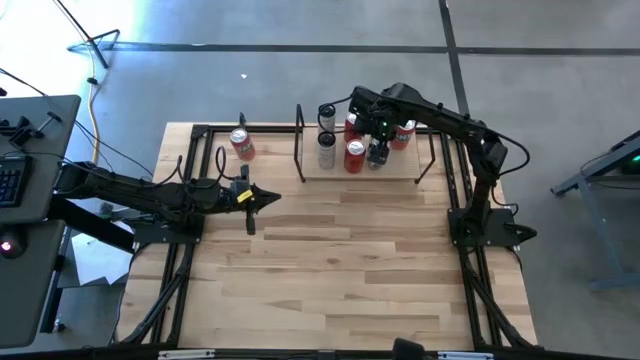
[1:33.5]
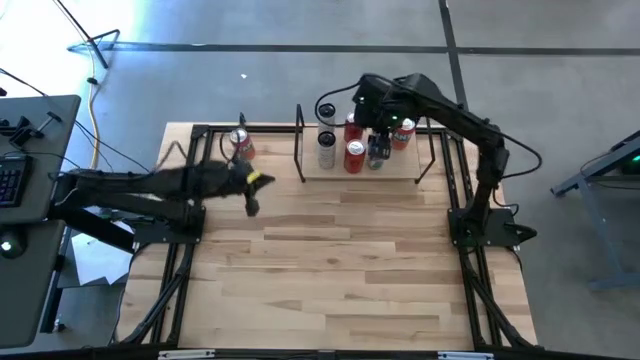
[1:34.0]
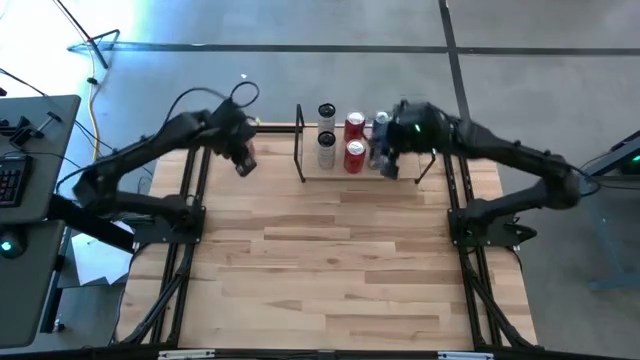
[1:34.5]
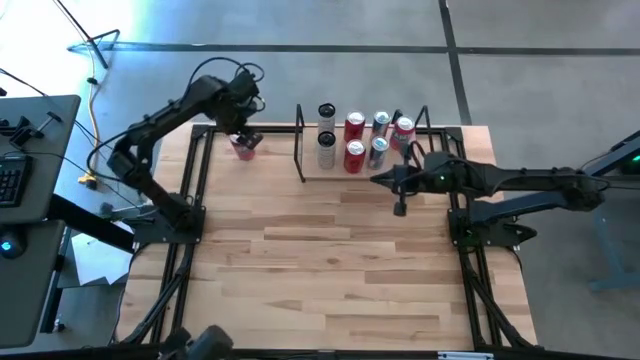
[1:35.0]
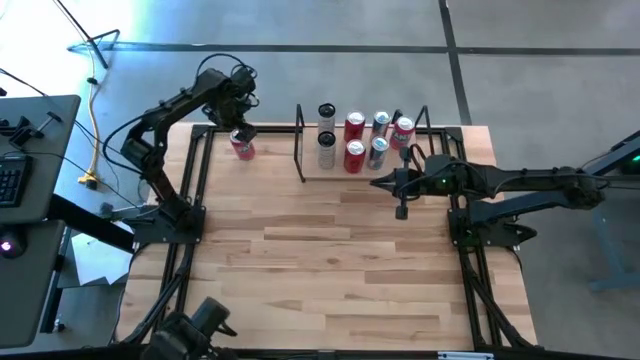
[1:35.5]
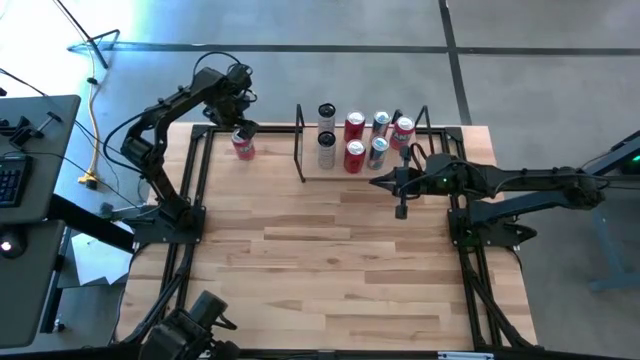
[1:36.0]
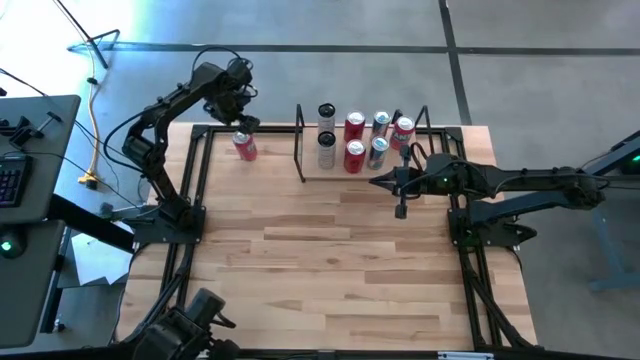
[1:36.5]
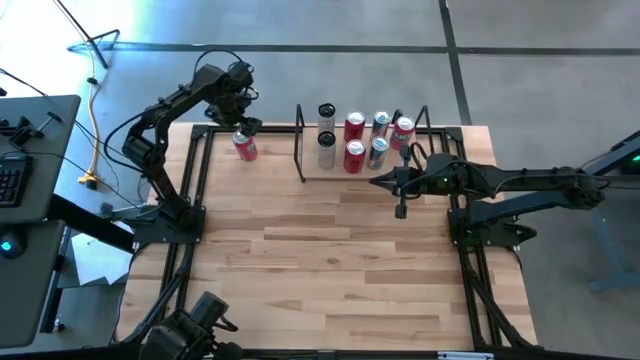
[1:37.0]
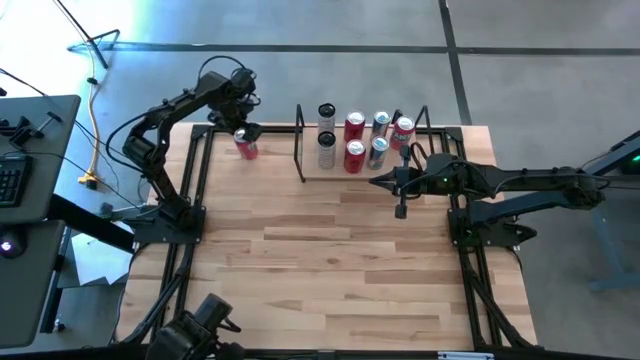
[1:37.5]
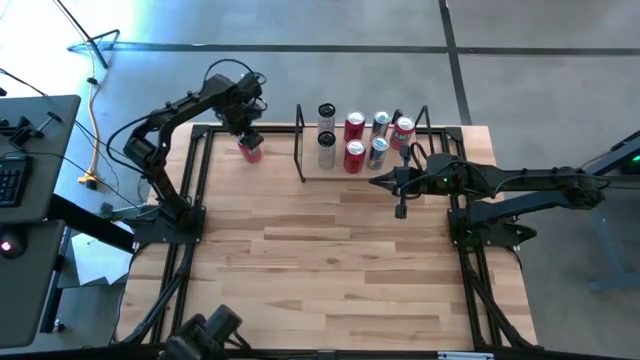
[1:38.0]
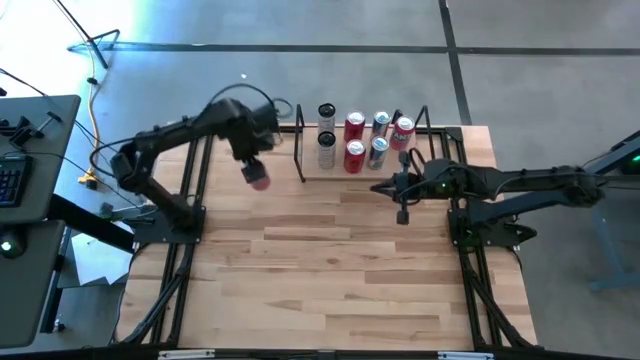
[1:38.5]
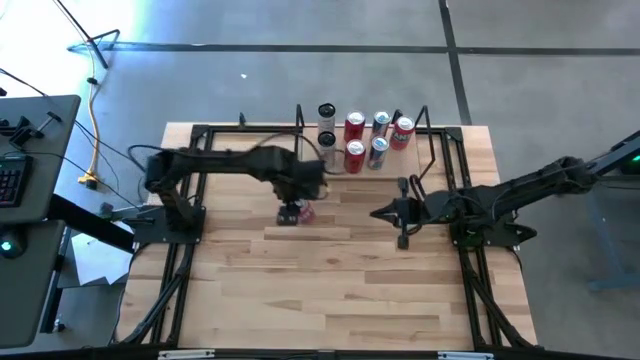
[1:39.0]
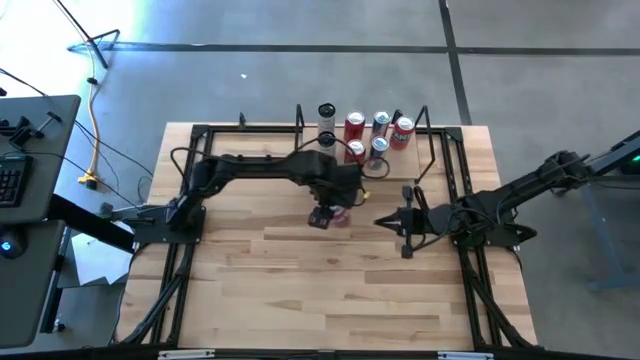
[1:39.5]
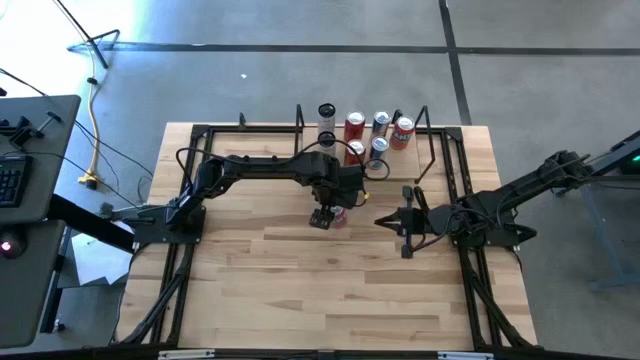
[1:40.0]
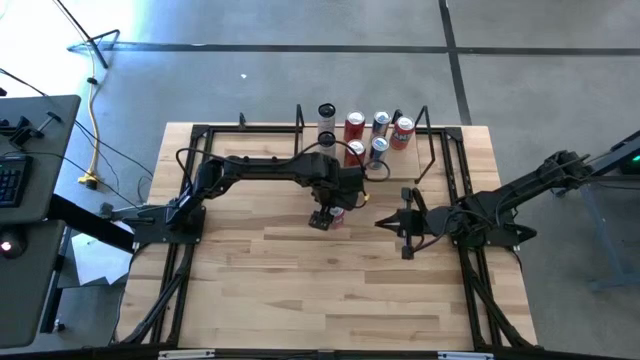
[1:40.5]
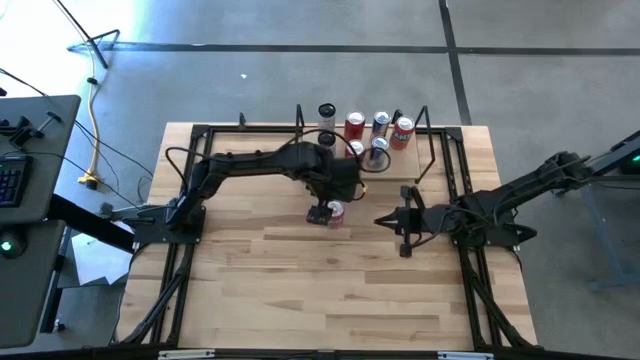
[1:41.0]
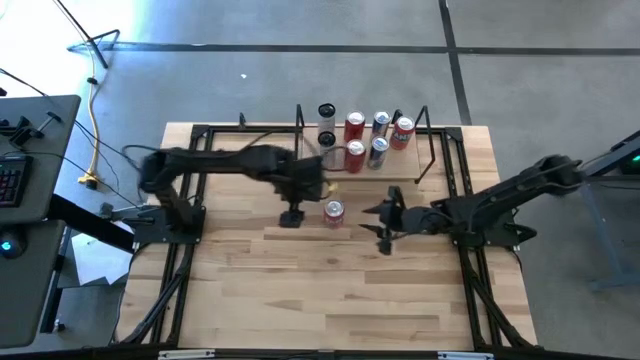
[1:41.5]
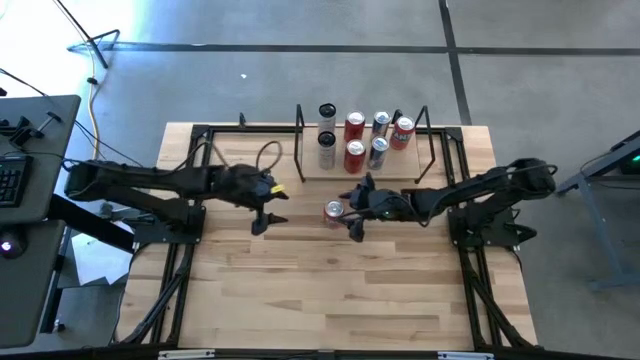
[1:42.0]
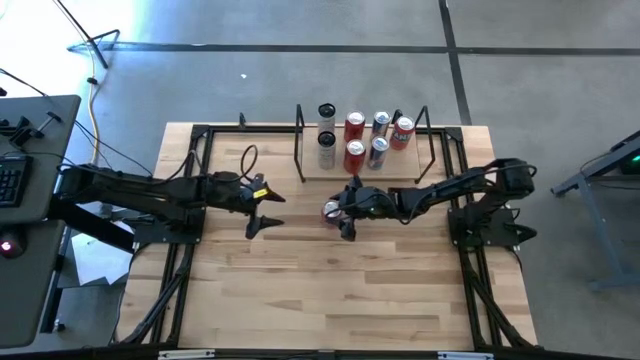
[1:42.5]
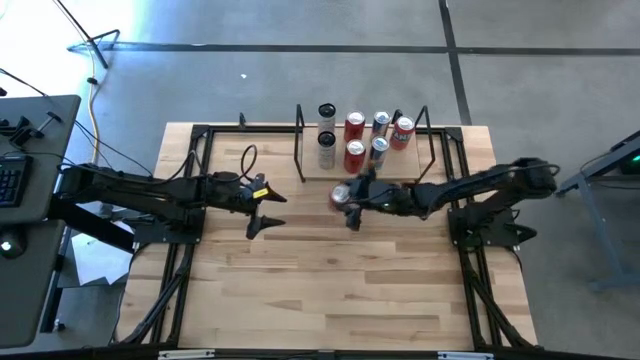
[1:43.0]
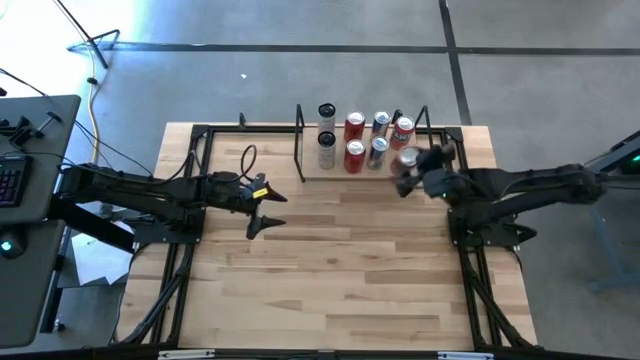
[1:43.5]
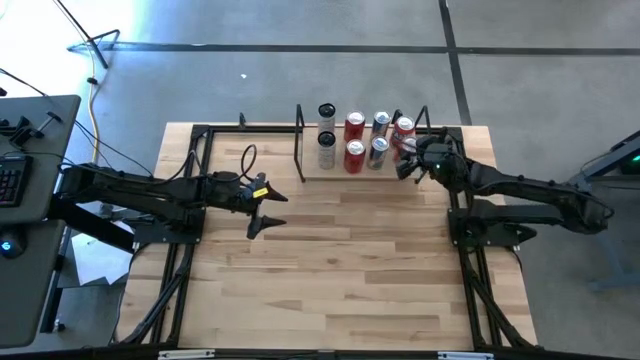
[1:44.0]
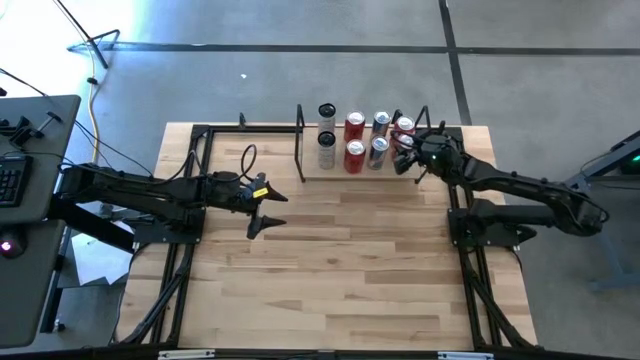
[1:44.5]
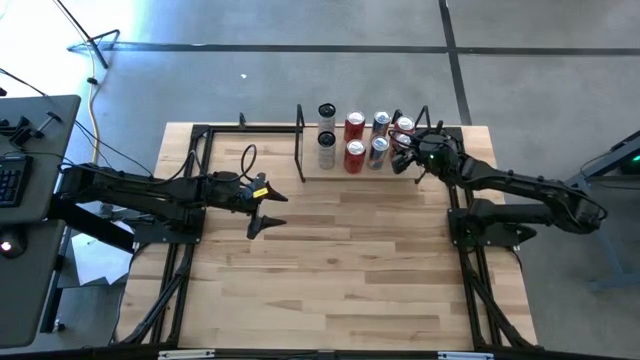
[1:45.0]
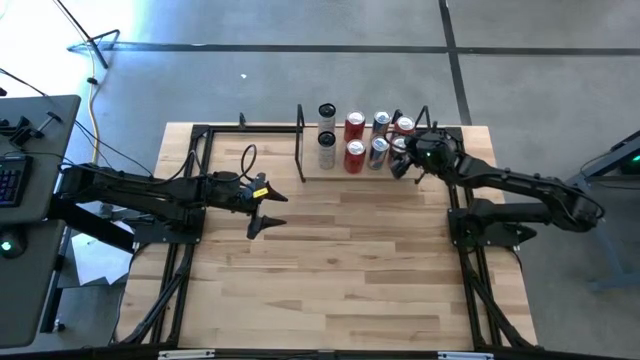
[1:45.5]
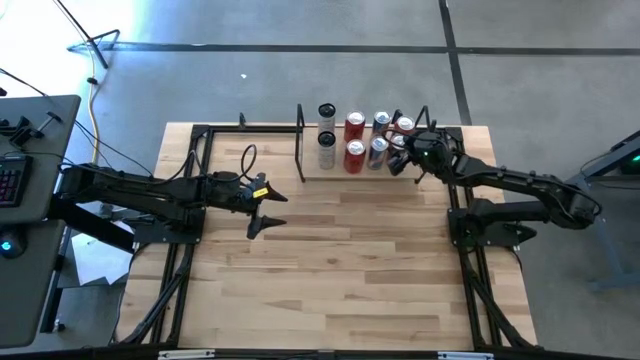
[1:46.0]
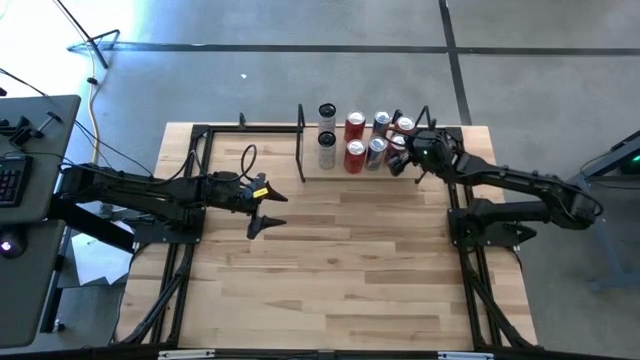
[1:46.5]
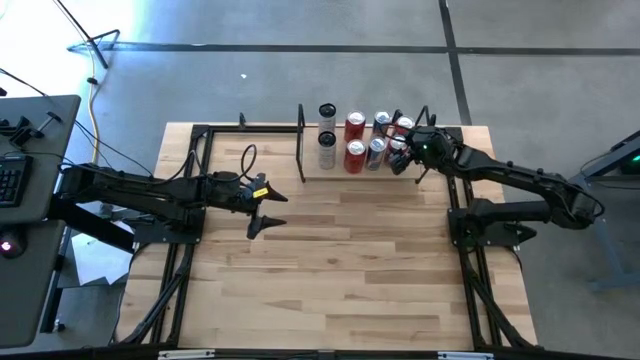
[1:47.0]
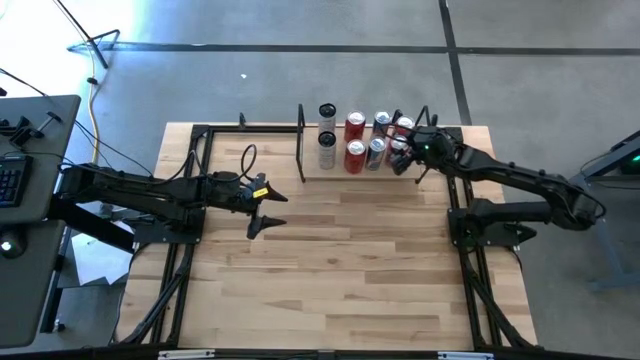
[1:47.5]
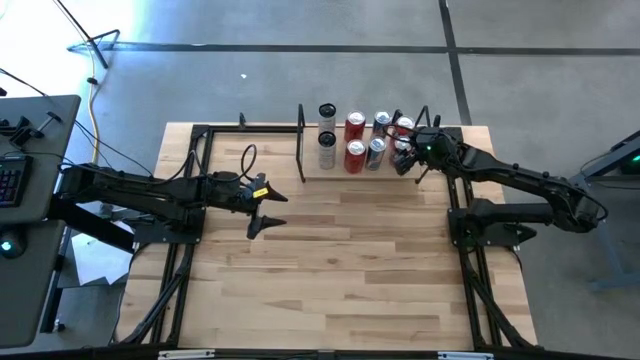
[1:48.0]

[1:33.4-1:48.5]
Task: Place canned beverage on shelf
Put the orange soda can aligned with the orange soda can on the shelf

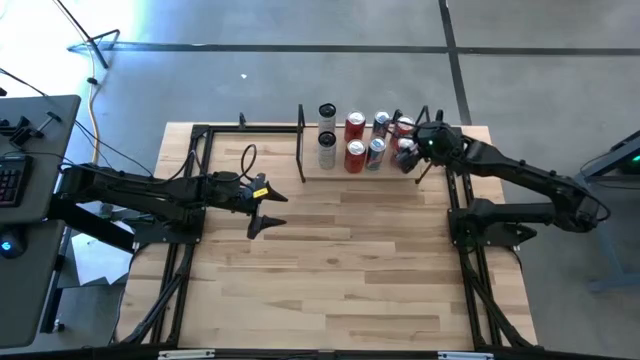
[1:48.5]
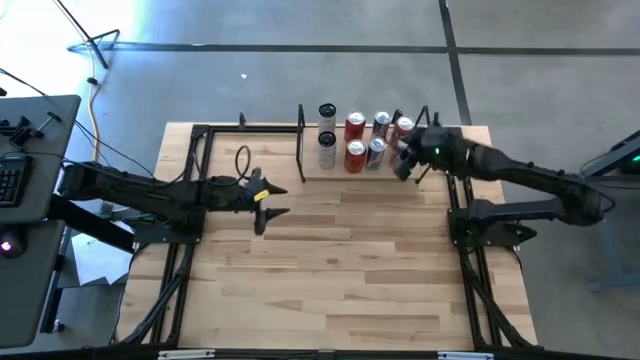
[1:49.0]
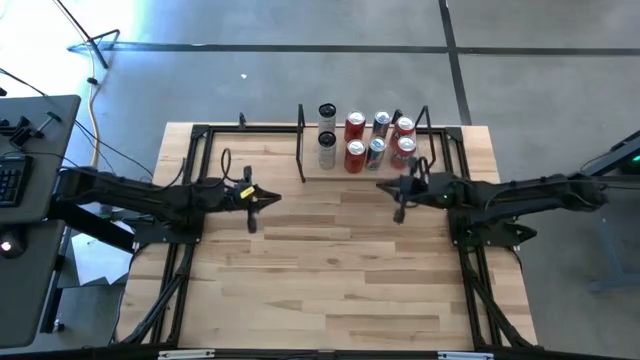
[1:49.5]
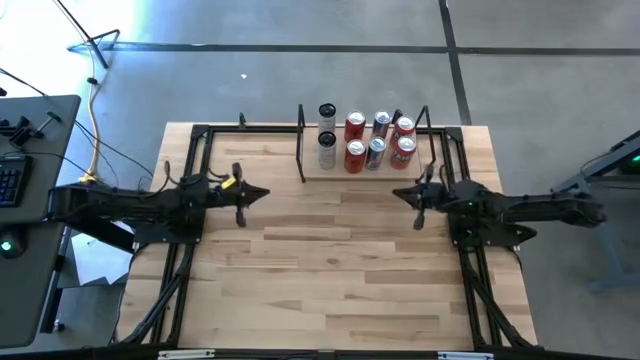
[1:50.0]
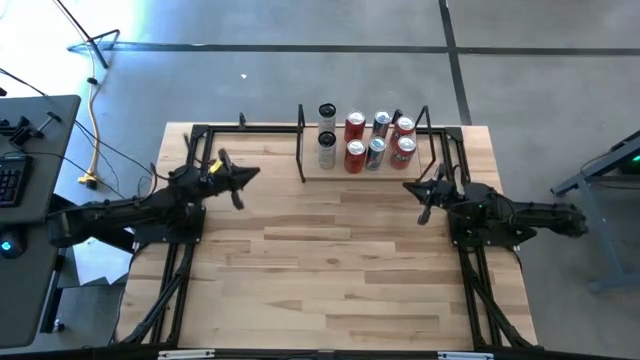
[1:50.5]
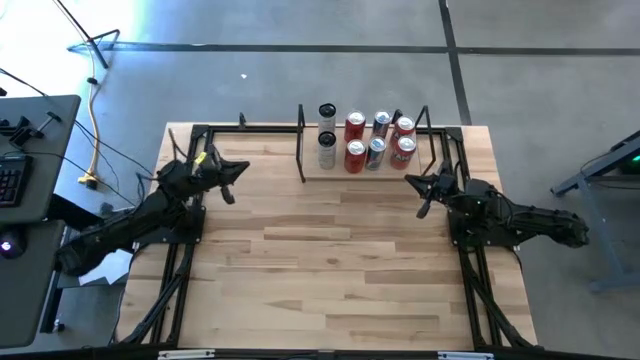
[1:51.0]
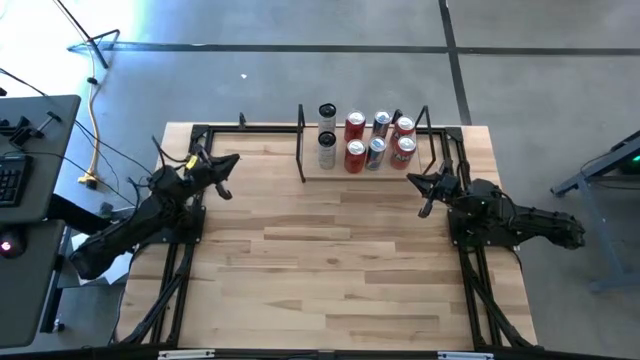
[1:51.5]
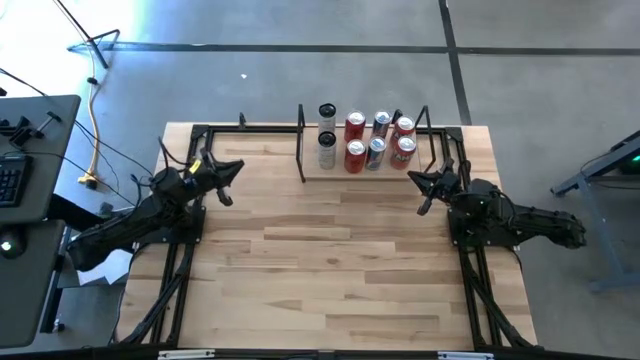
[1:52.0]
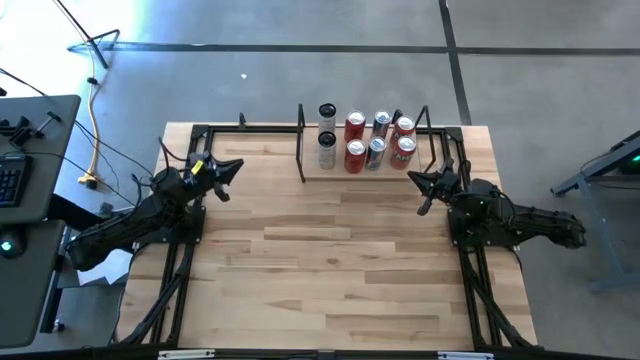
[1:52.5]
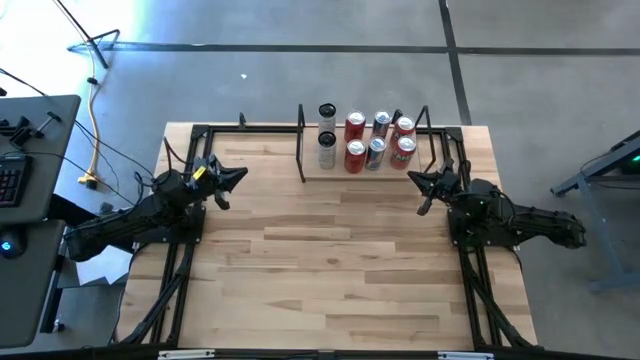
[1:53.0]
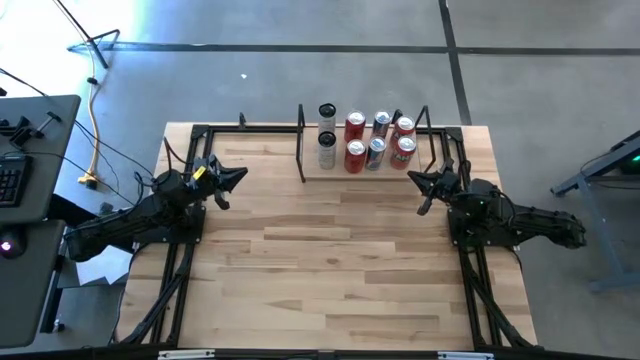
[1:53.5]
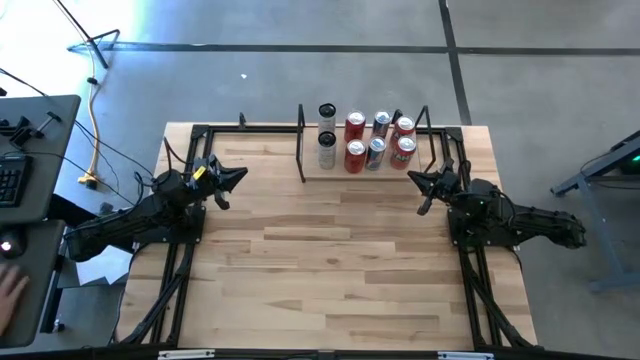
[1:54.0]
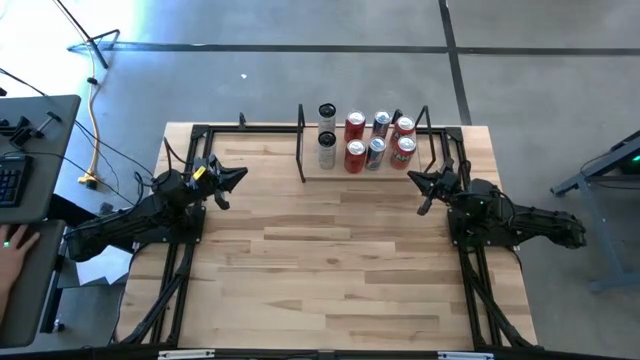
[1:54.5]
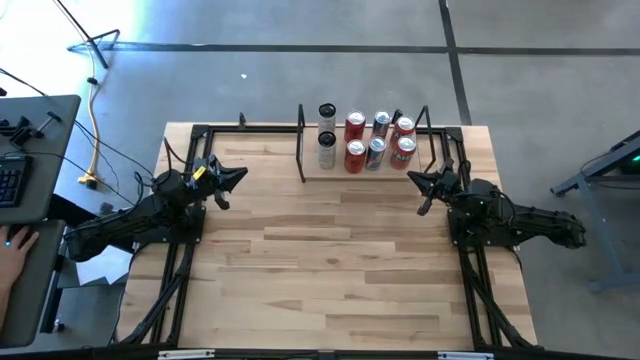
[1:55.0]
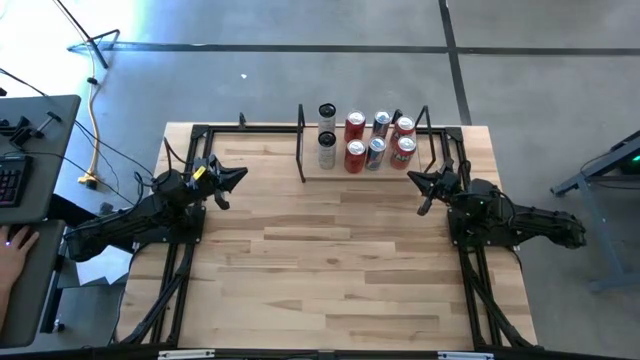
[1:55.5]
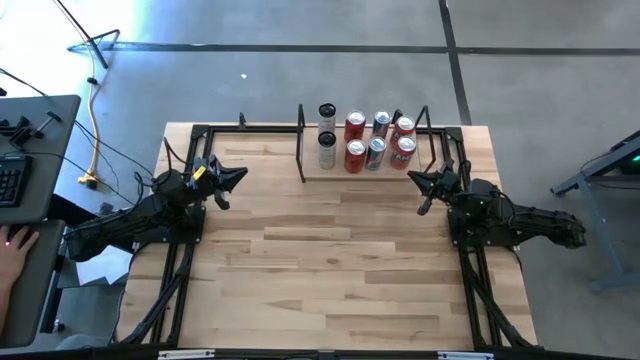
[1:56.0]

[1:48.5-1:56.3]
Return to Home Position
